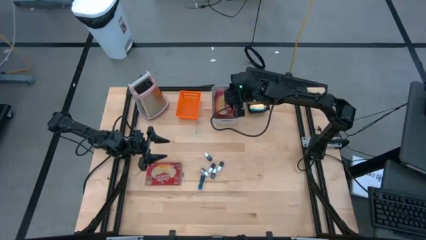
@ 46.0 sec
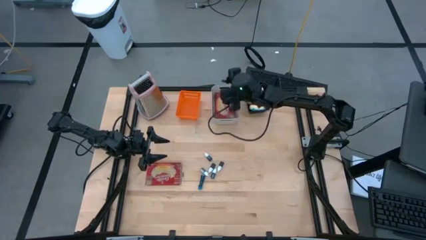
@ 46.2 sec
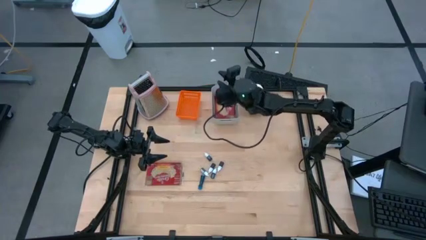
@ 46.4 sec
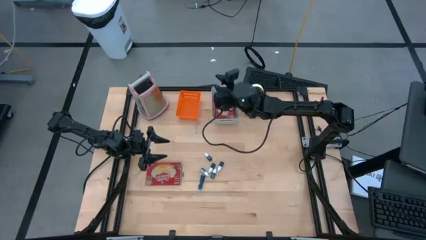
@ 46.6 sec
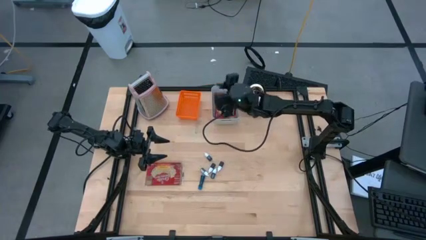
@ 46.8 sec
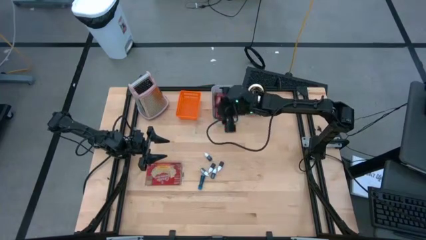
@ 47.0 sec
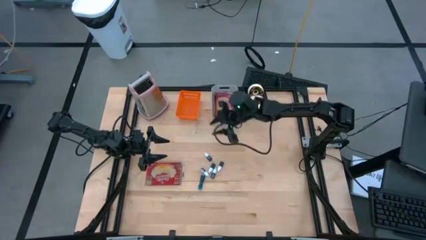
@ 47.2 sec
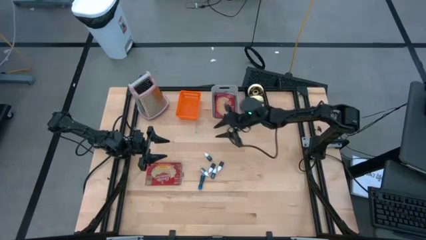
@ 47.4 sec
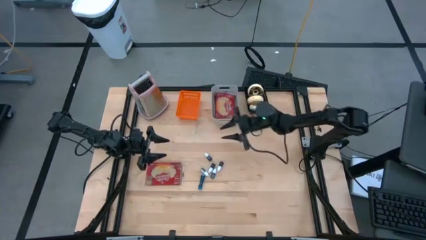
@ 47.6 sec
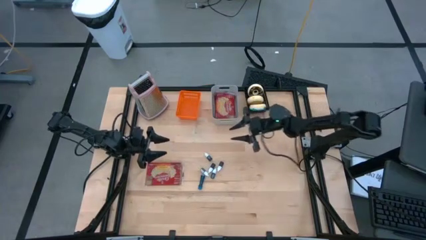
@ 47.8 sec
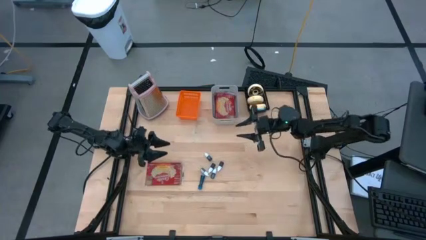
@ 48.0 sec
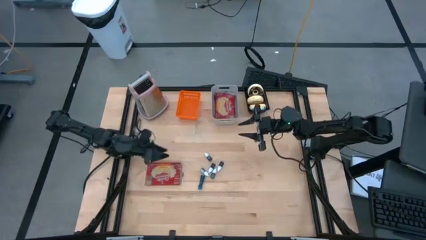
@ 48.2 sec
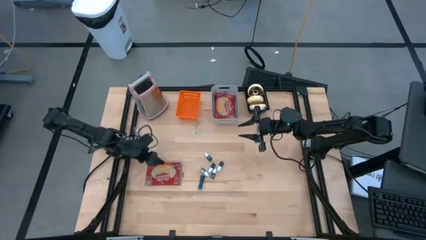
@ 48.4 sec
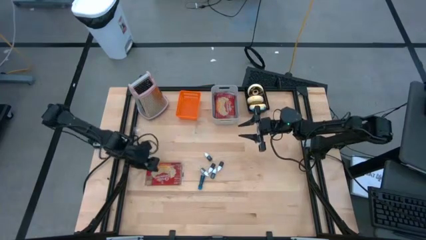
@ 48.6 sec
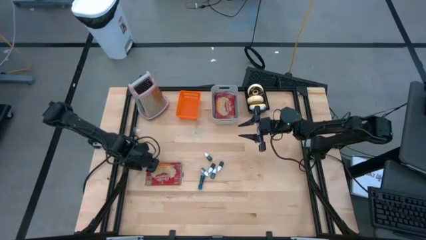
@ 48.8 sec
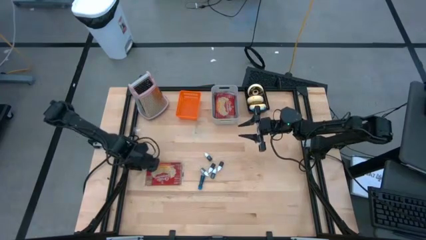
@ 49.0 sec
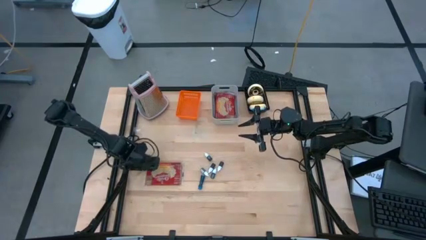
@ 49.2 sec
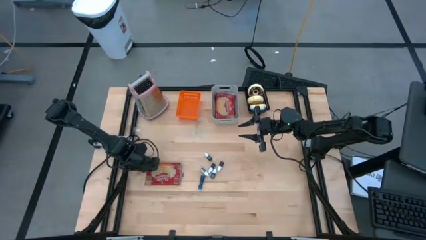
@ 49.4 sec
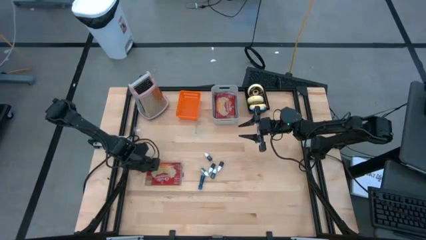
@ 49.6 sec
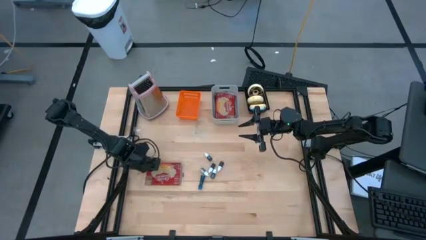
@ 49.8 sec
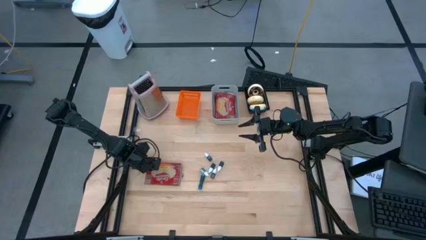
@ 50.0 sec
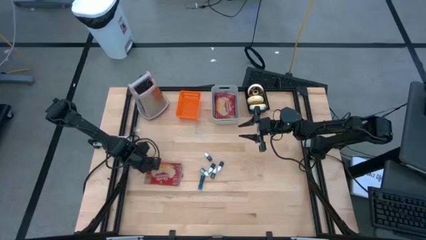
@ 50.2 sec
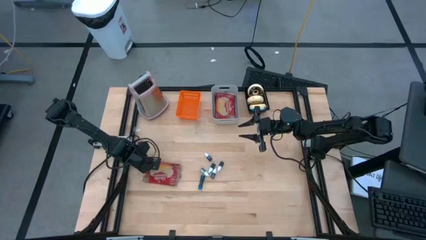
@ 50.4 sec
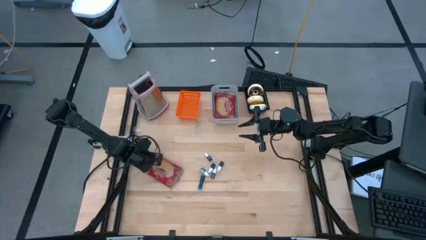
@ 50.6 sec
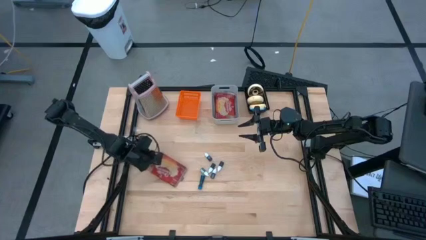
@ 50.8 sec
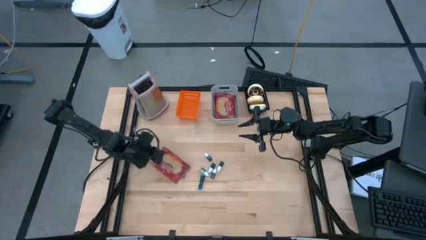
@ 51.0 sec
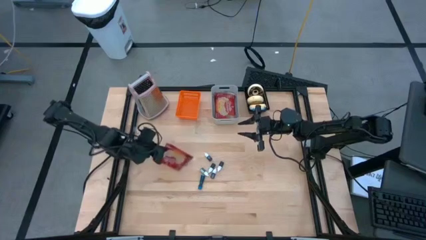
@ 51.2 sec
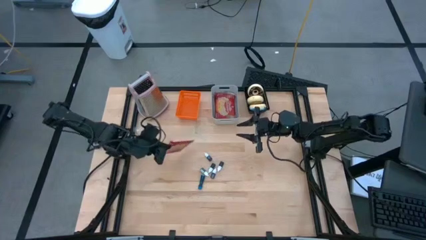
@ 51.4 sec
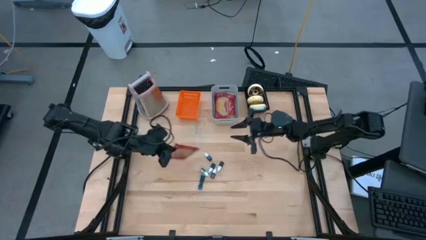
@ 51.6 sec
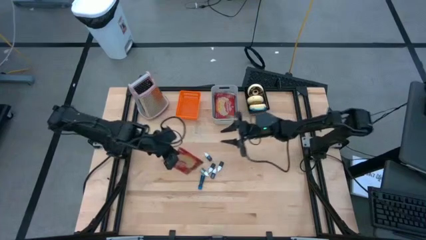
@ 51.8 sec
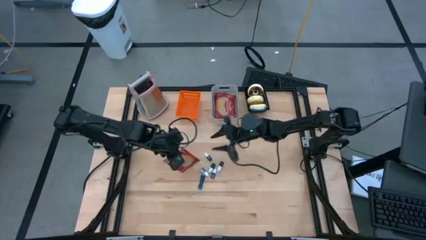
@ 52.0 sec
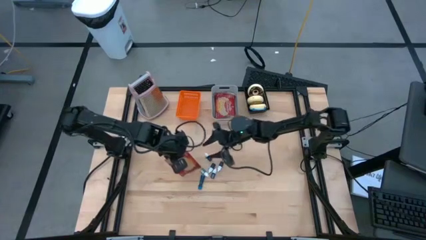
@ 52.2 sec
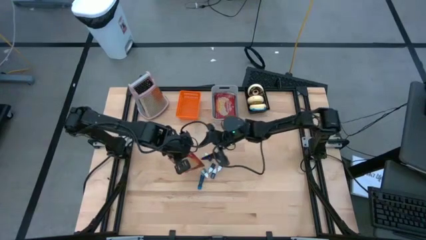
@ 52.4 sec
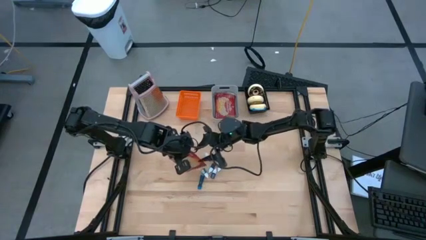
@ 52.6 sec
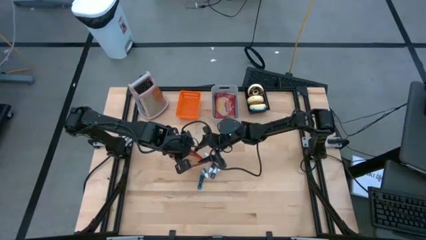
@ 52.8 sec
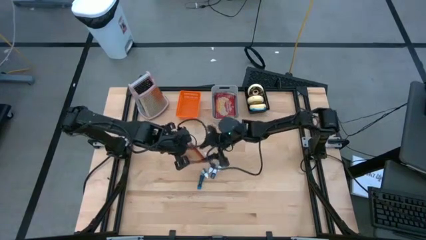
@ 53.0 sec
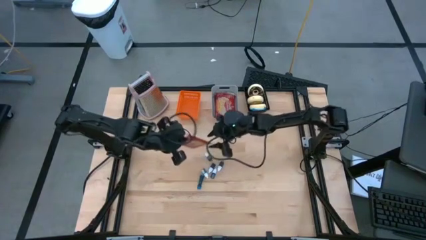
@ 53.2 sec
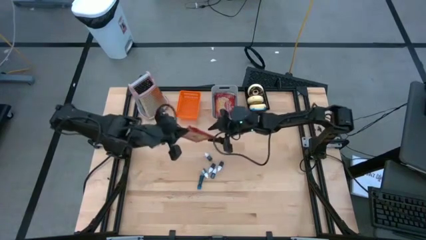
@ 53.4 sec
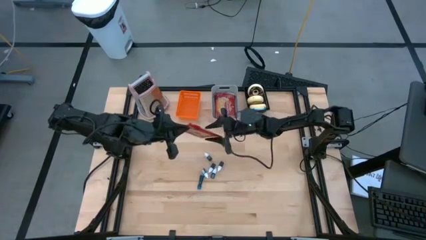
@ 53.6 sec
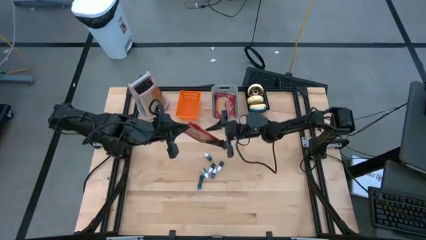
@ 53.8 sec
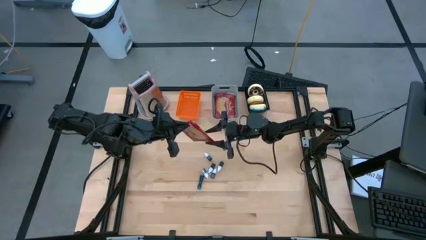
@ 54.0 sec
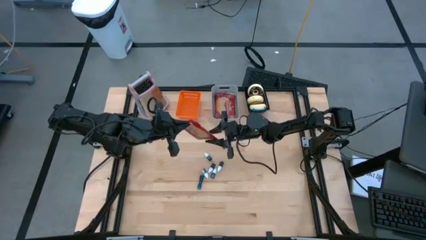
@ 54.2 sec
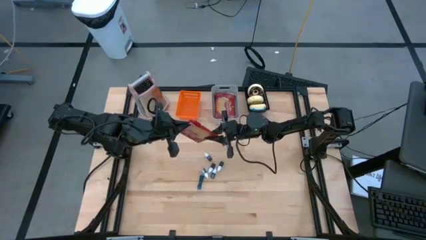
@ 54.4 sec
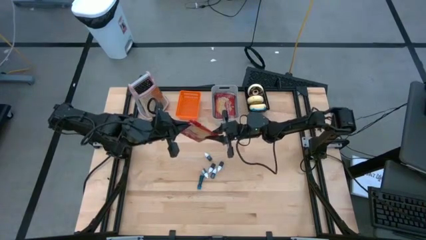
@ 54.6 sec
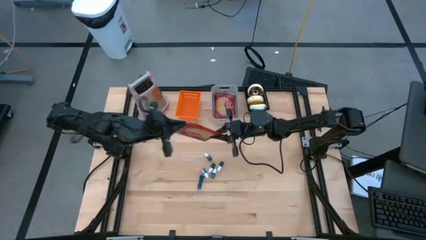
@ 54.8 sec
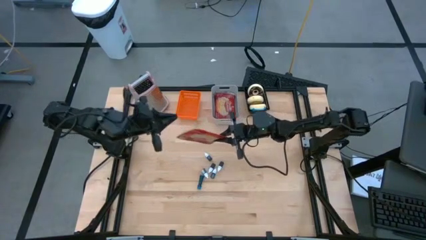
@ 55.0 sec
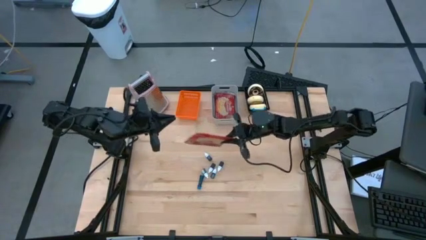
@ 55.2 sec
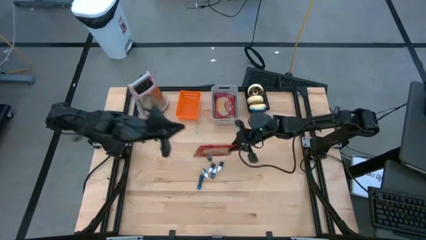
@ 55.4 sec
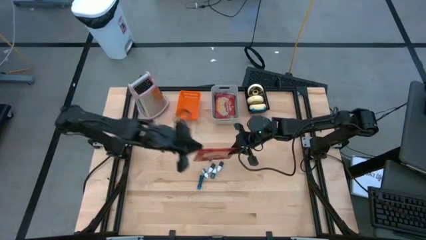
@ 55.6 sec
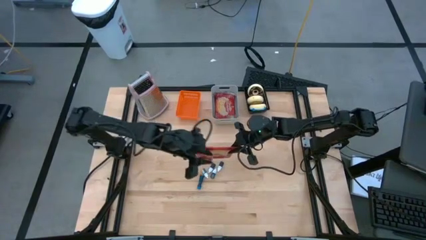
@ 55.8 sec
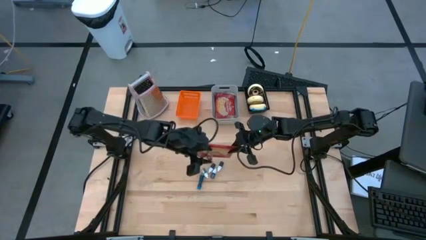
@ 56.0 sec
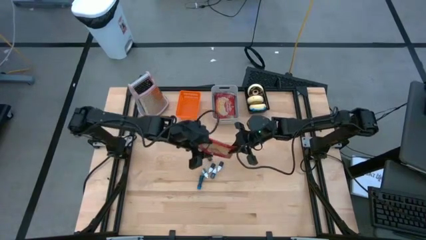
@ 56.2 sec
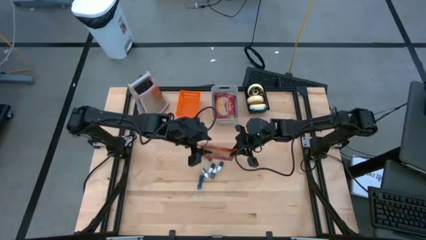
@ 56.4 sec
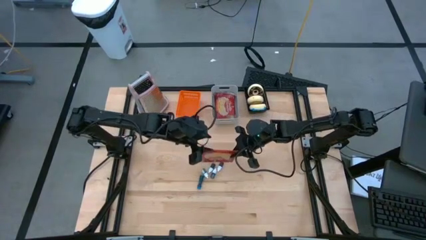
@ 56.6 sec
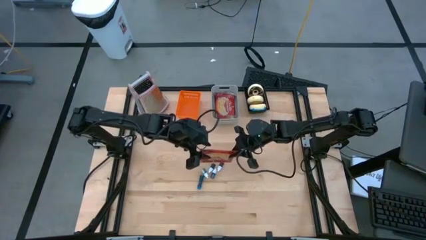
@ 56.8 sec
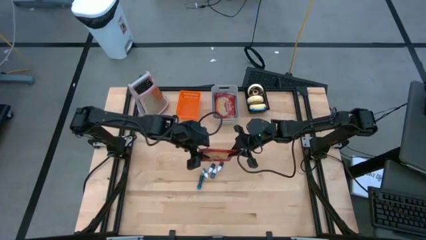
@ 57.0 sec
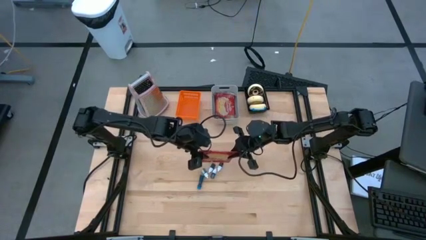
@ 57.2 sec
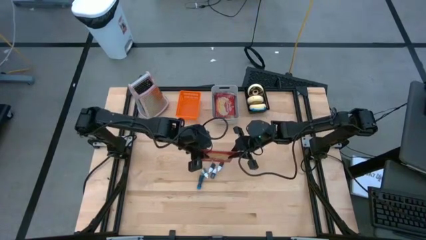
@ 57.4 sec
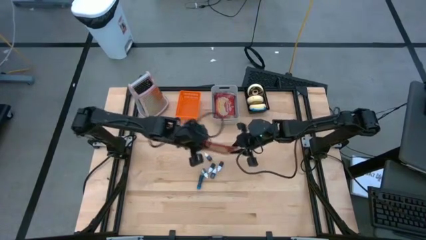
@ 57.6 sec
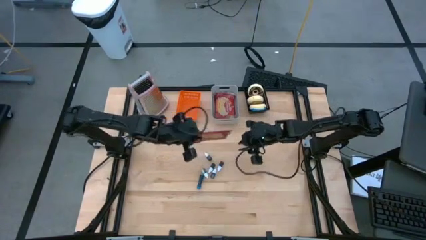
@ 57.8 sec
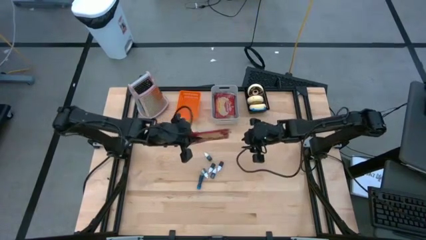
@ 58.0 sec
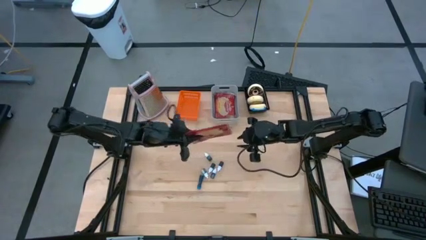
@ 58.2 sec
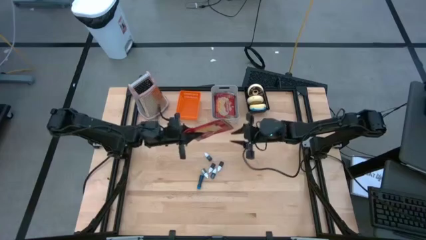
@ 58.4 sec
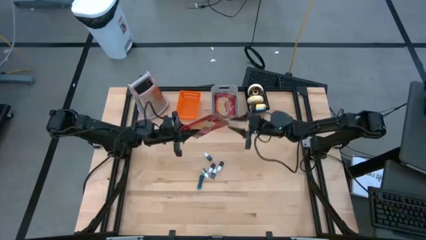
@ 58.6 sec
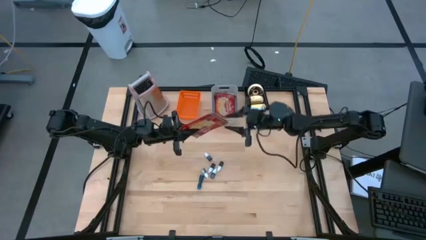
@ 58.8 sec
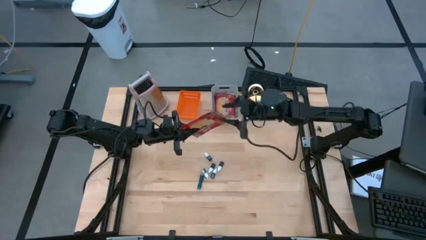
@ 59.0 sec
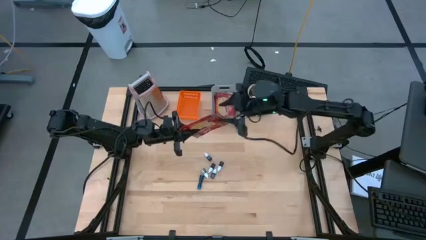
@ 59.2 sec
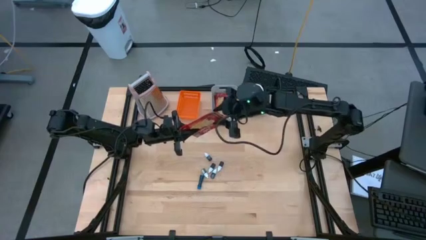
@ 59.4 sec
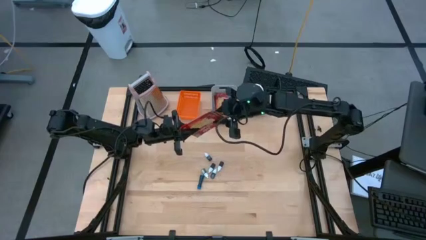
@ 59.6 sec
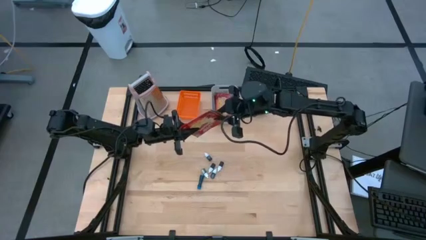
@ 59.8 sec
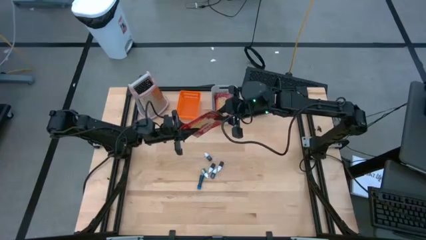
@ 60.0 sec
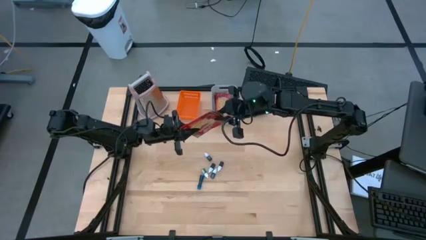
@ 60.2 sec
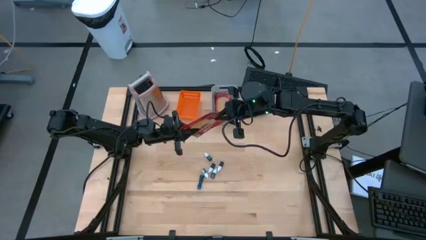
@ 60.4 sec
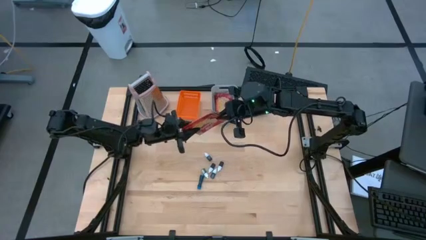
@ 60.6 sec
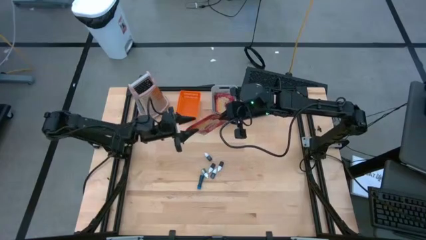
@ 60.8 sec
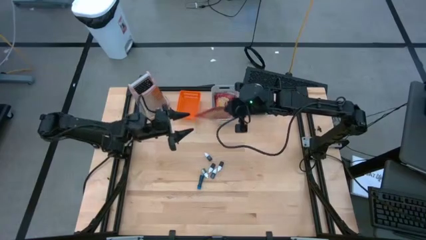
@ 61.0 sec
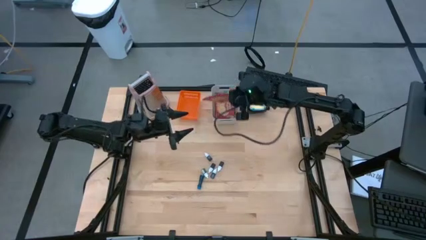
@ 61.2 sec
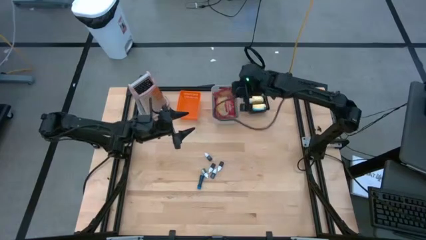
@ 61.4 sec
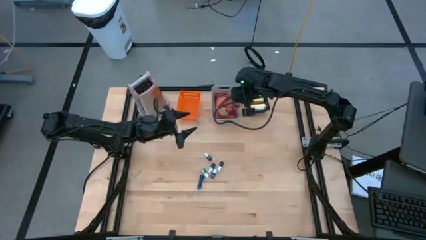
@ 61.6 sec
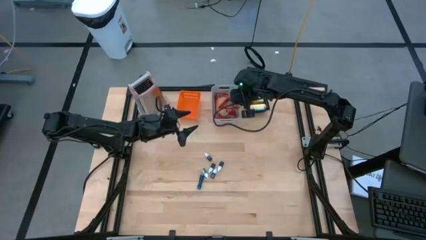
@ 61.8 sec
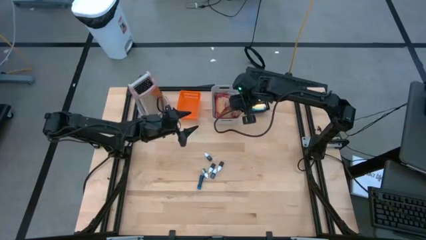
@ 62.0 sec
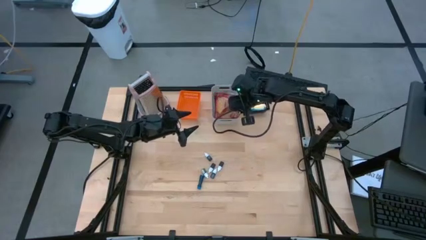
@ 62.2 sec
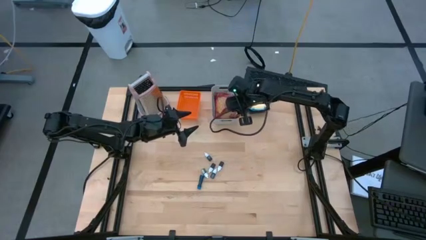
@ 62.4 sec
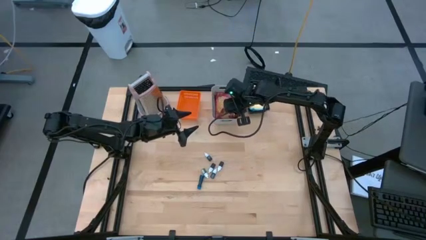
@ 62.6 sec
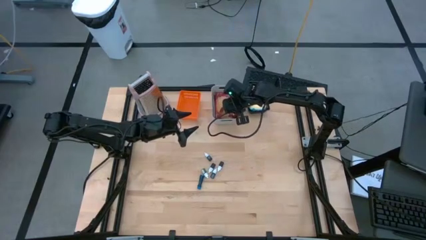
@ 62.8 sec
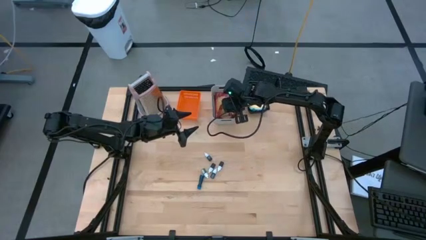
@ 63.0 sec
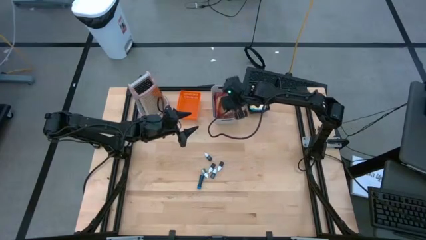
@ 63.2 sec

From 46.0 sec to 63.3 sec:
Put the red popcorn package into the gray bin
